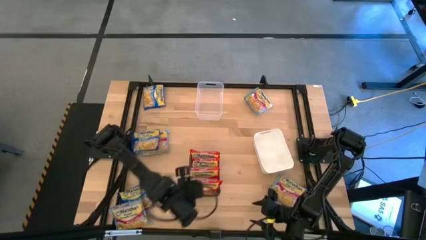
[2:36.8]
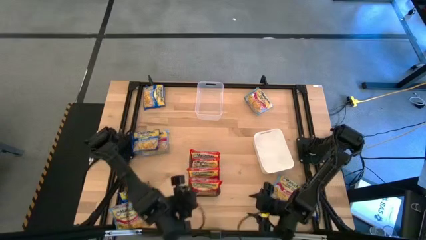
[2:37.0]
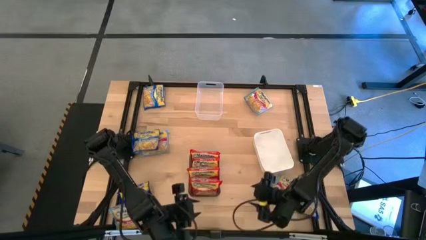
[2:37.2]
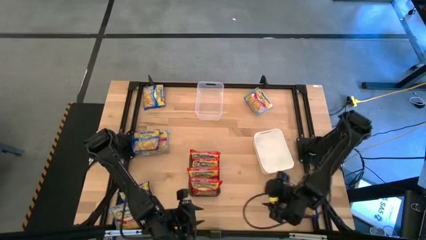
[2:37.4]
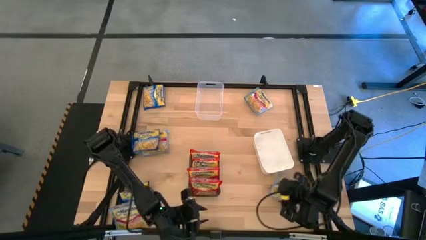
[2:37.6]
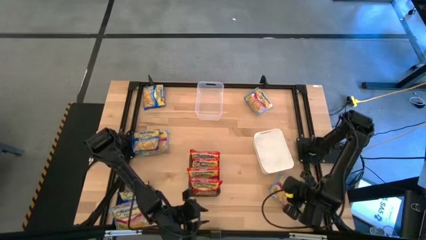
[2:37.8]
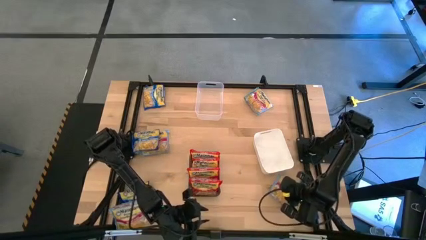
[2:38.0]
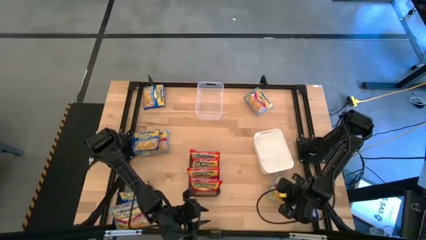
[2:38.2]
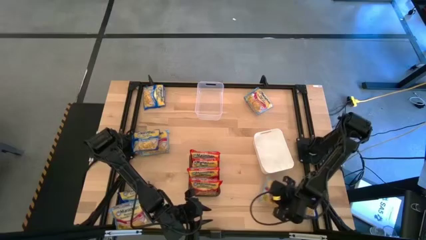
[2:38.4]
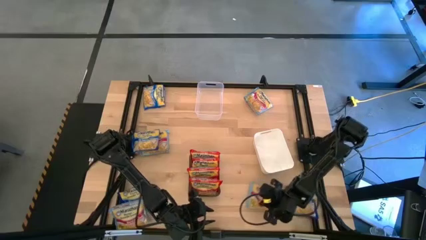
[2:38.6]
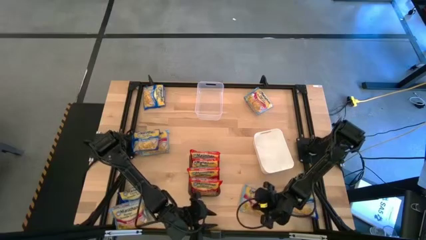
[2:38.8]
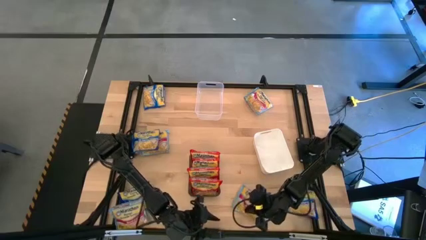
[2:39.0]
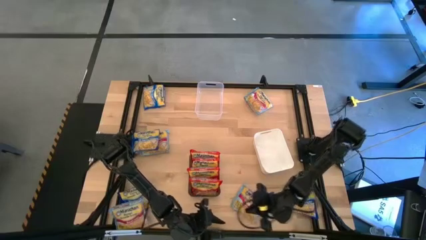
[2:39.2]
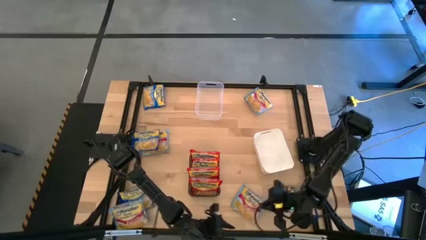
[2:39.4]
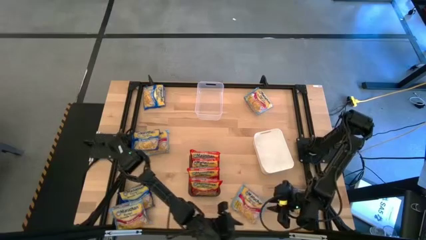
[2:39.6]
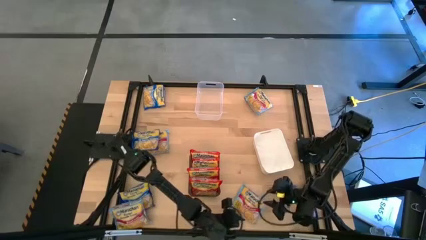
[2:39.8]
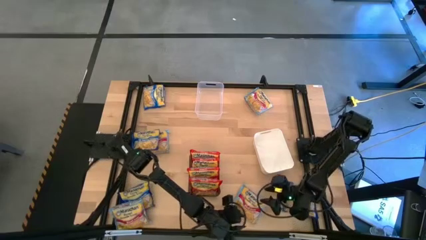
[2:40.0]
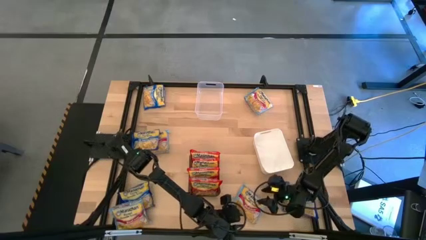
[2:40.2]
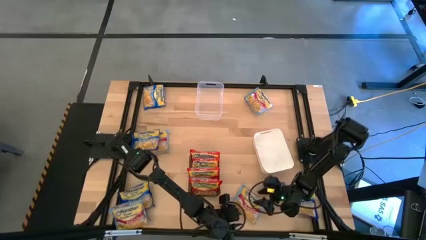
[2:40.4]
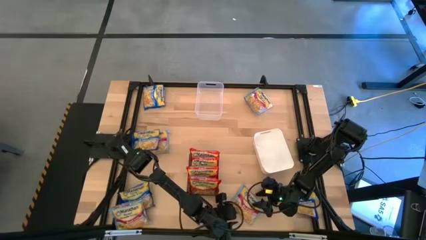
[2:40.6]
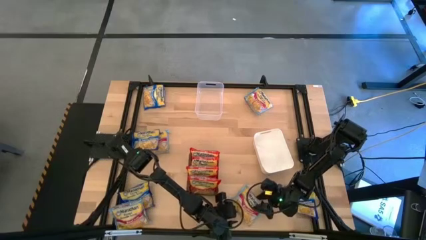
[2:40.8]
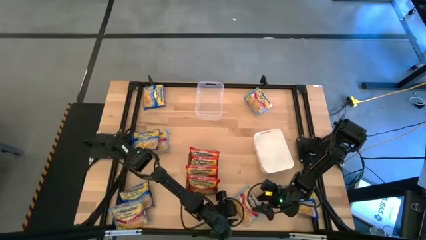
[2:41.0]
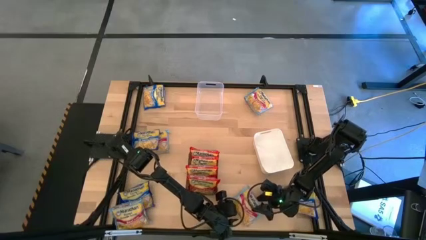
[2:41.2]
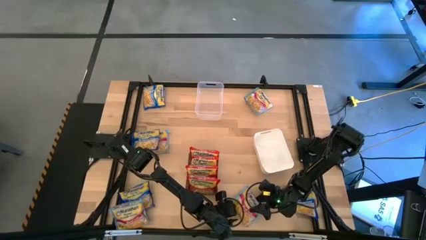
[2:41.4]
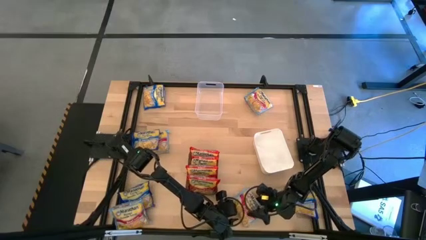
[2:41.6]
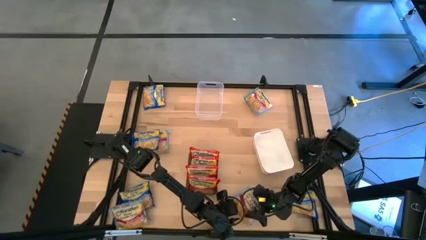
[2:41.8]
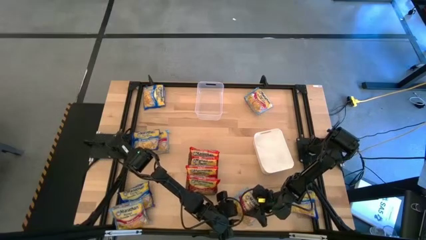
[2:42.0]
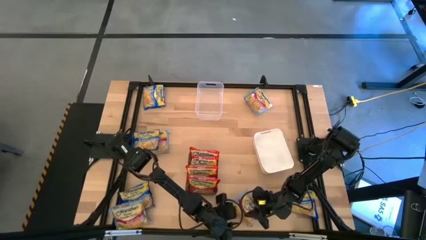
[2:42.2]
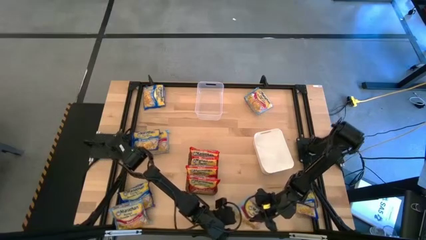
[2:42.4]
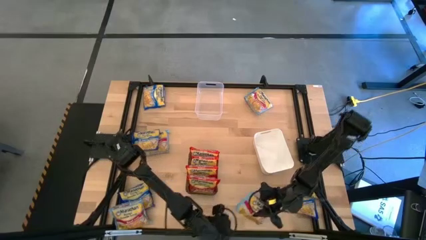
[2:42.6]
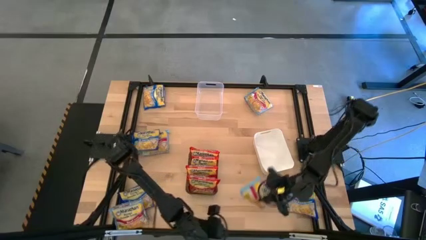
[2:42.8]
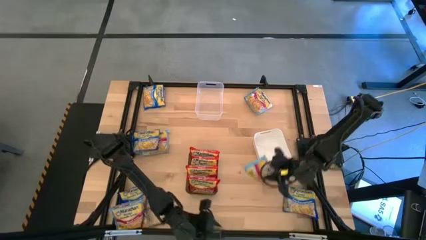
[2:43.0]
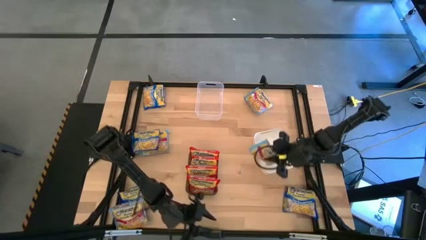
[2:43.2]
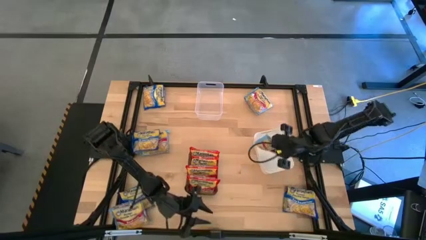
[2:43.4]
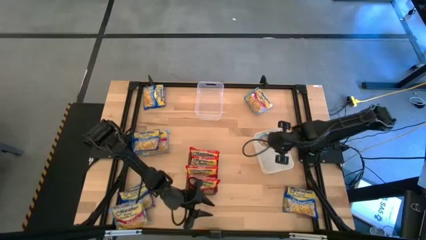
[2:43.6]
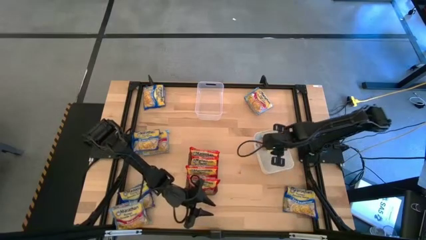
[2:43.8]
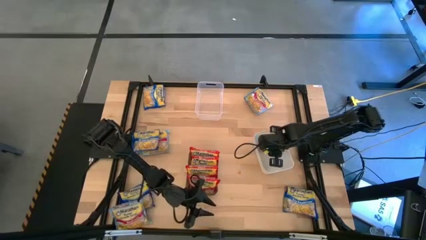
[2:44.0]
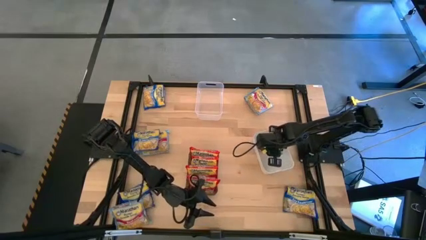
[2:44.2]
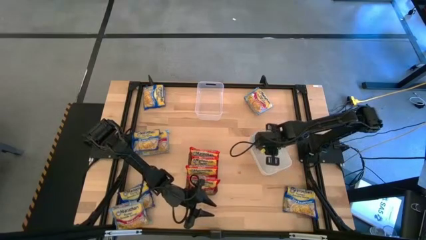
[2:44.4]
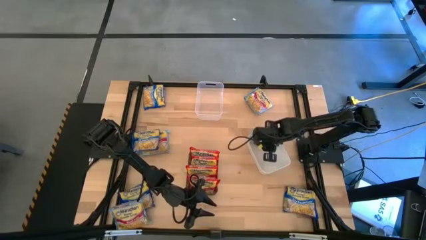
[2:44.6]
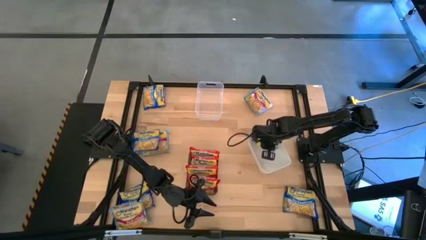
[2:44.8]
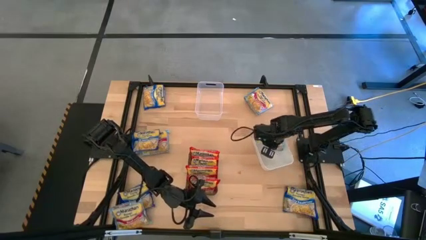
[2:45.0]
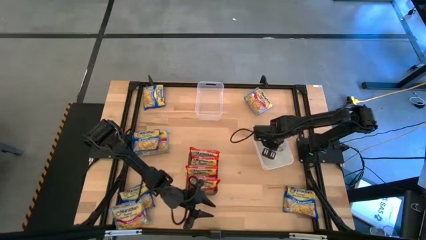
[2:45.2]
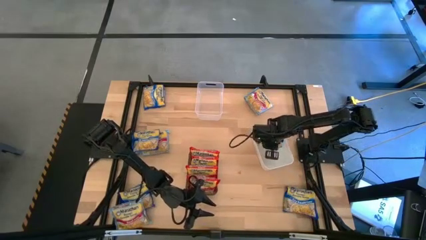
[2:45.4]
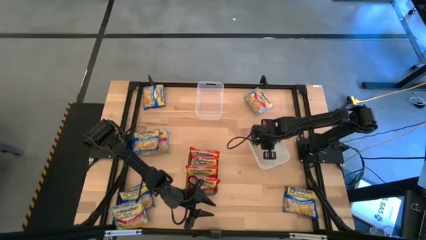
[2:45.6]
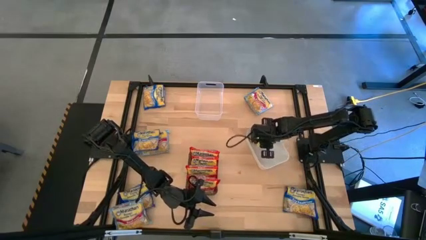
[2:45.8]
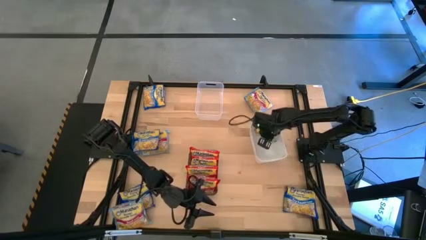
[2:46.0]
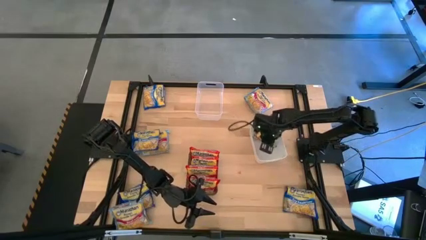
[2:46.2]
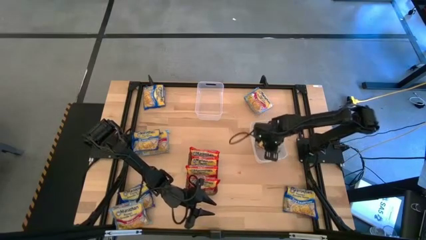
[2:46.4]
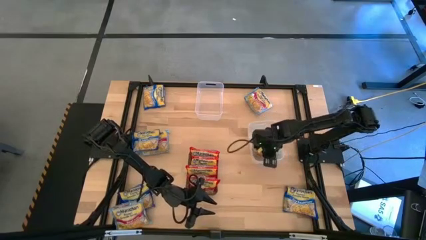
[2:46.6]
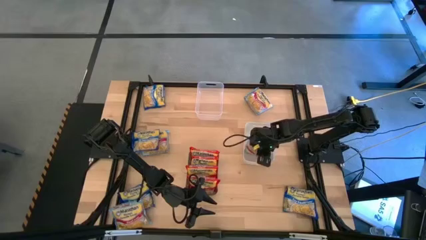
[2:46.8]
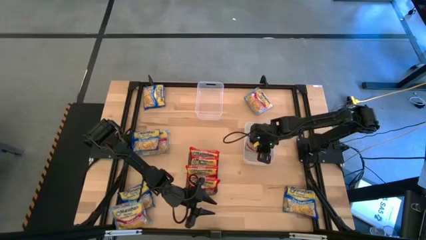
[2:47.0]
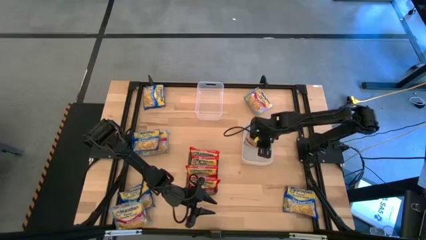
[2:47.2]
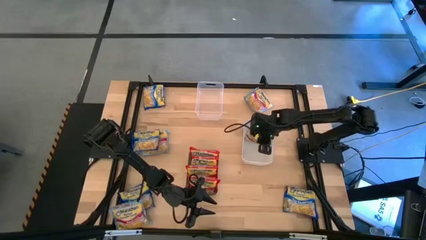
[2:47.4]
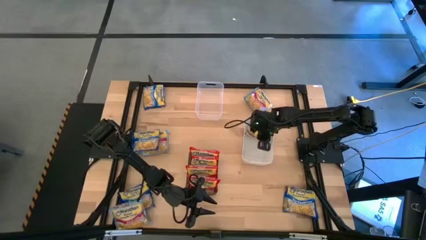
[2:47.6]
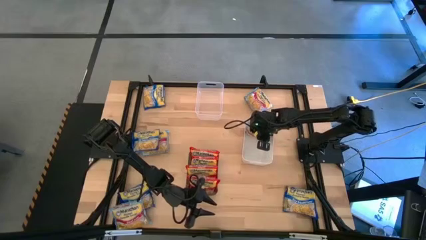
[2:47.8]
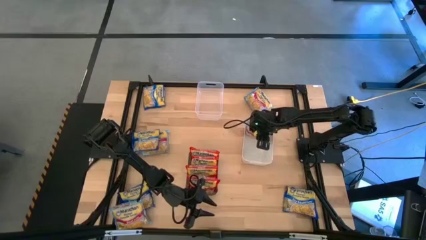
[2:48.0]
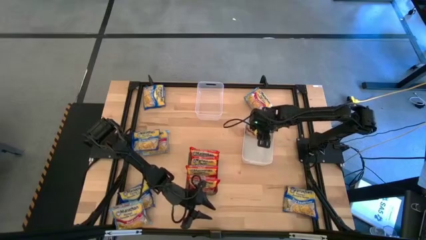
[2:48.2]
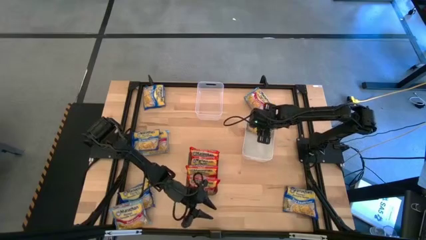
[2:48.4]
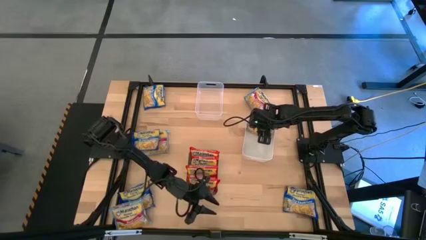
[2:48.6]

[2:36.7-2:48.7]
Task: Sort Maruchan noodles
Put the light blue noodle pack into the white bin

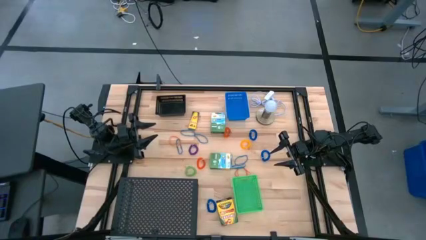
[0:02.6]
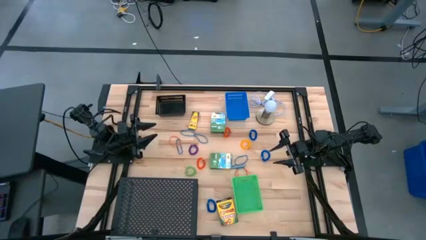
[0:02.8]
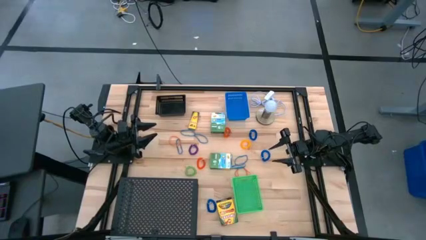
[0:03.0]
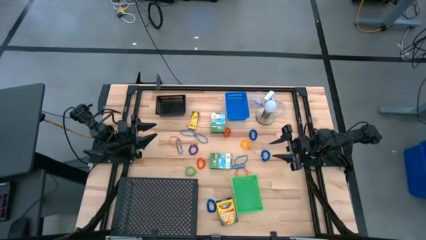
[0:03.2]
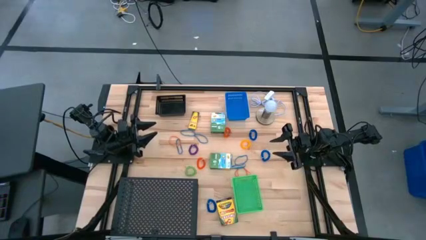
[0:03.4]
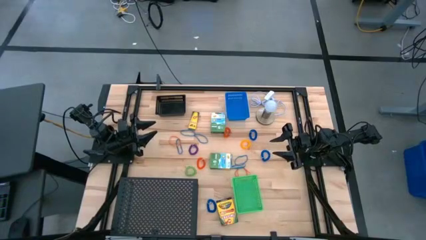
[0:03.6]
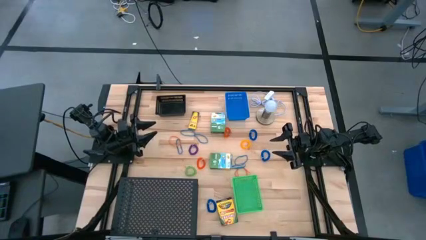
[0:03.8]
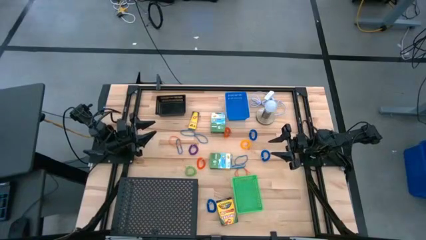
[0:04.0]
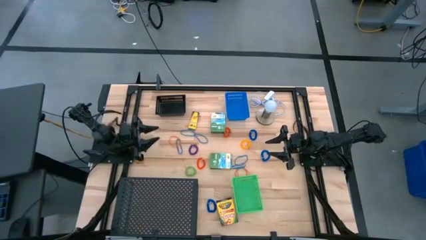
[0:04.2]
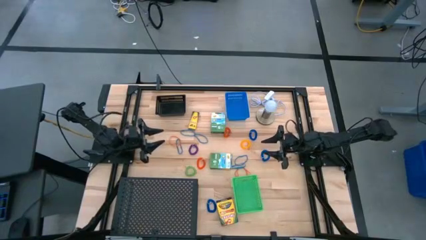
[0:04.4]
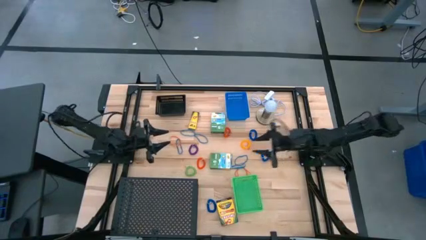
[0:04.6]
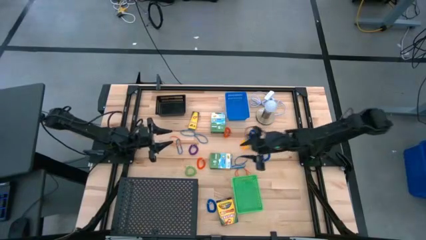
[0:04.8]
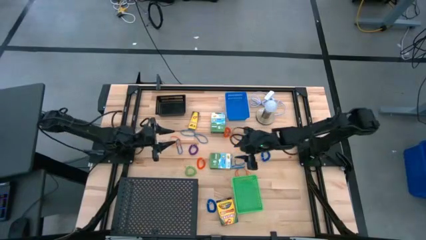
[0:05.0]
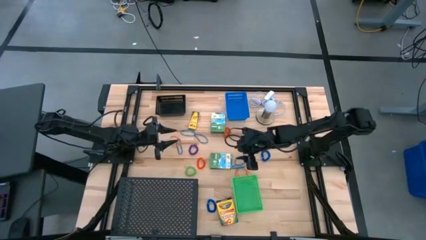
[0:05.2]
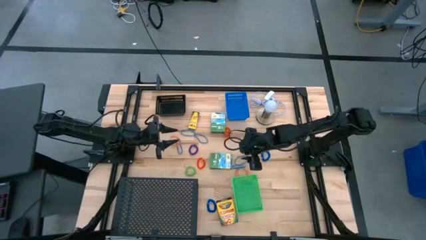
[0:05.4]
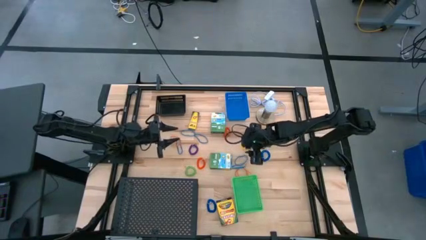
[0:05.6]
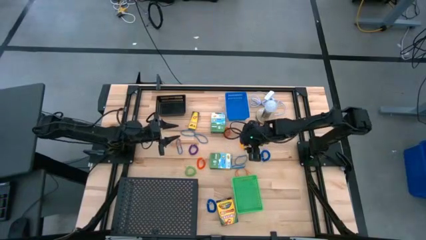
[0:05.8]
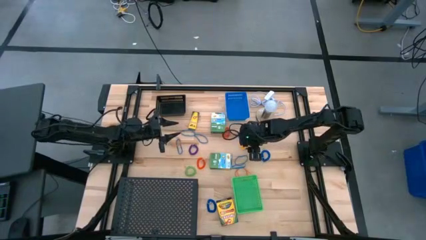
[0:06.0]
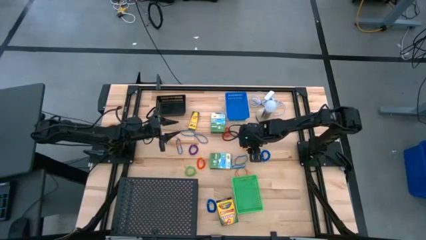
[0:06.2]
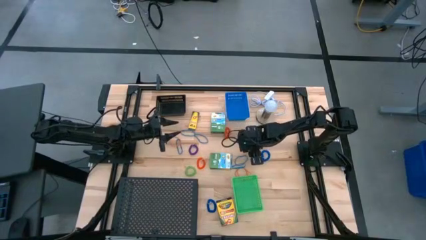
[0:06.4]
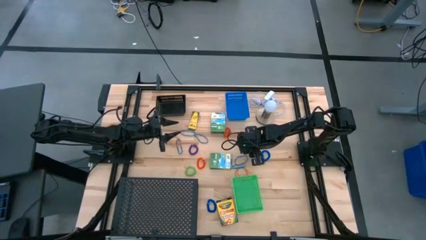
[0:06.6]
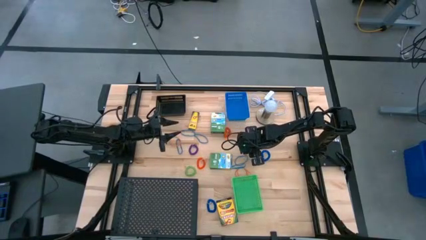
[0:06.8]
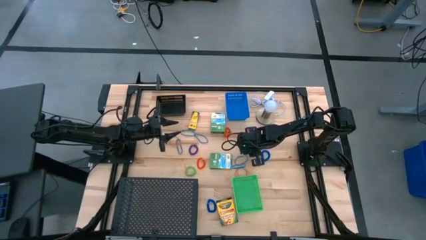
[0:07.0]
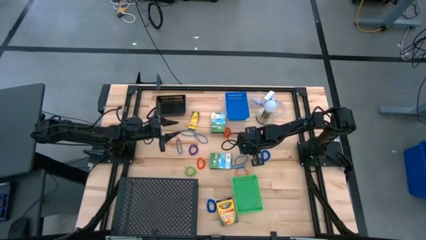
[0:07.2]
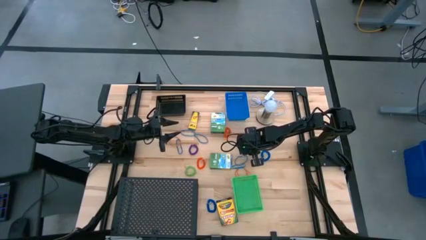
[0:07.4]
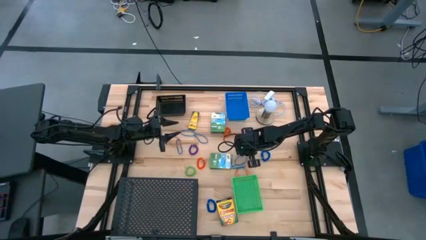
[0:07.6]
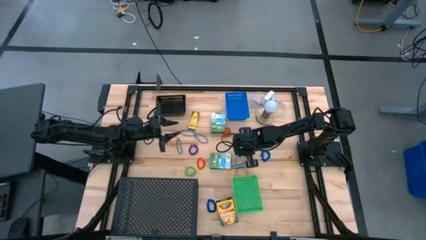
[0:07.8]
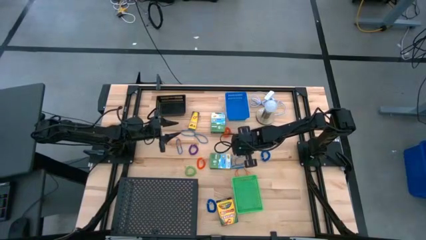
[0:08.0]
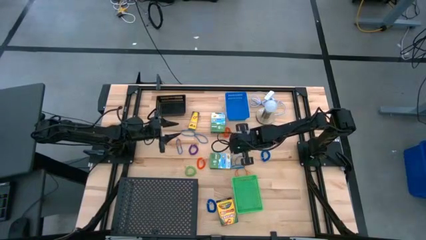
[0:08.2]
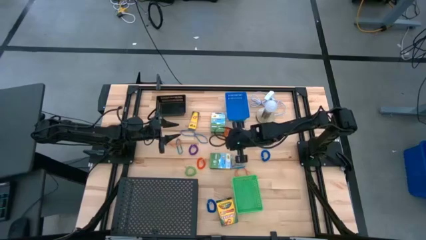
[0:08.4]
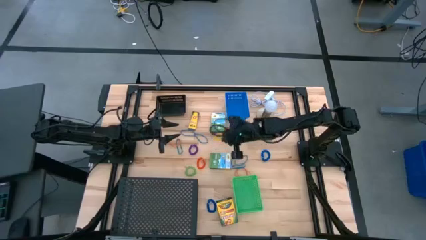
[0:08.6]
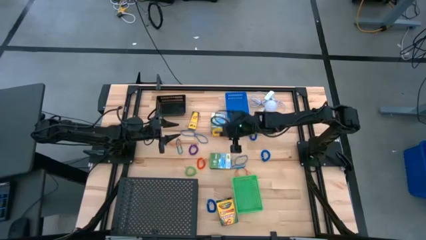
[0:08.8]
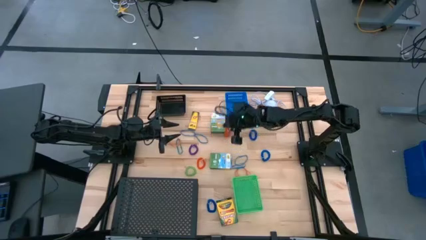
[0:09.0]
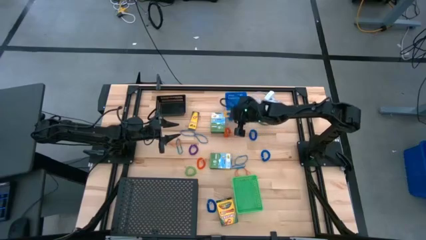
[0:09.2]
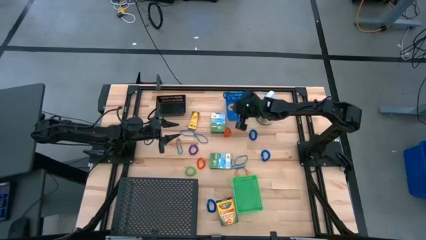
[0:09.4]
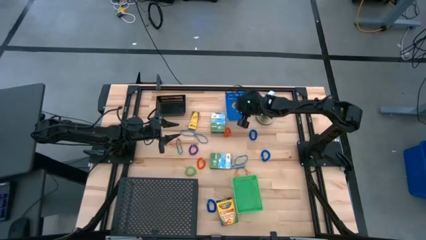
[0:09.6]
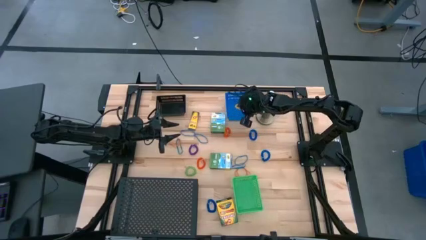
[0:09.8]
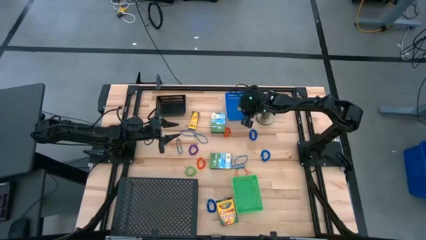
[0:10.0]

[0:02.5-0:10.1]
Task: Pick & Place Office Desk Supplies
Put the yellow spring keychain into the blue bin
